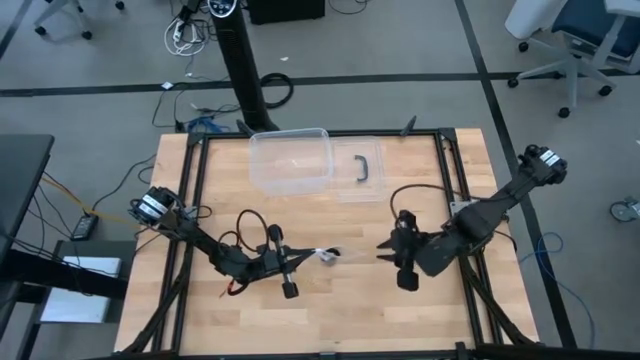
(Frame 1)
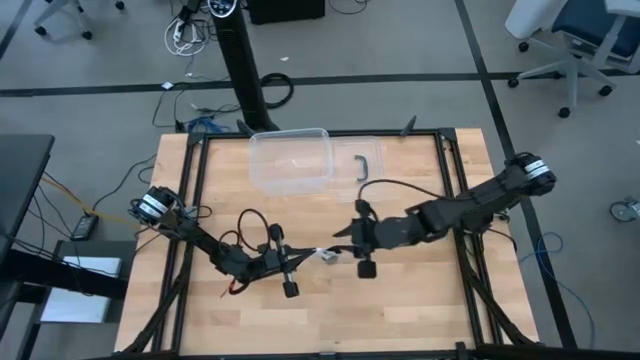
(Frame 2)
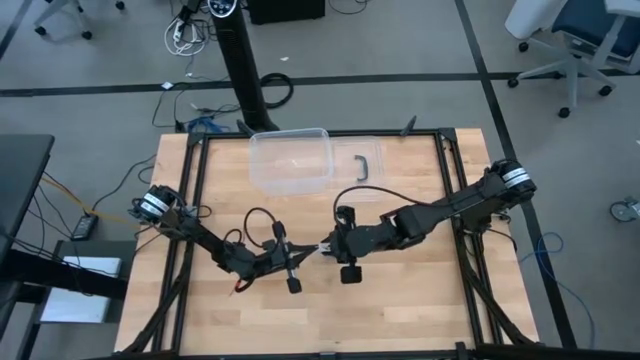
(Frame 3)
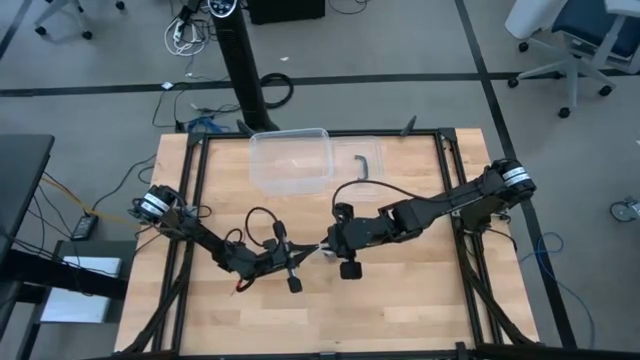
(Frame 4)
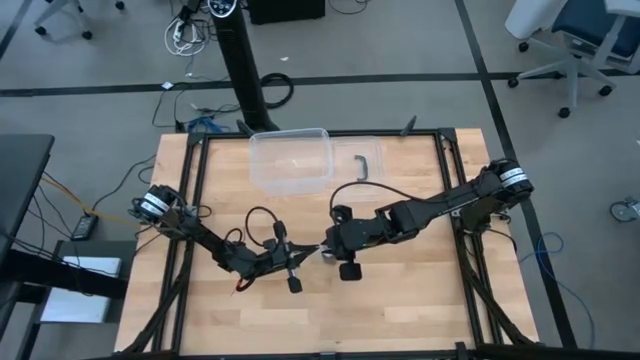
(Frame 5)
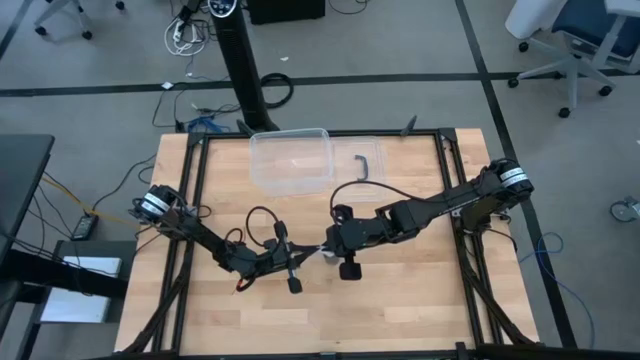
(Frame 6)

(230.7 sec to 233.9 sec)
Task: Roll bandage
Close the transparent zip bag

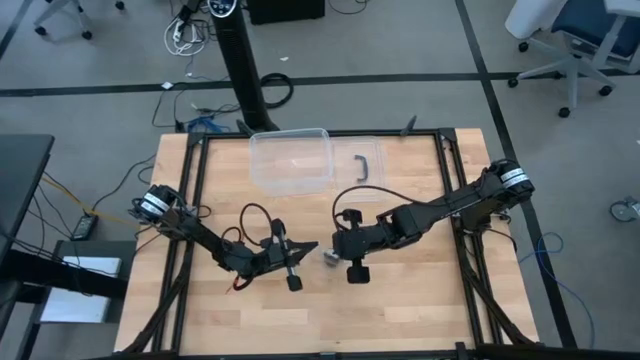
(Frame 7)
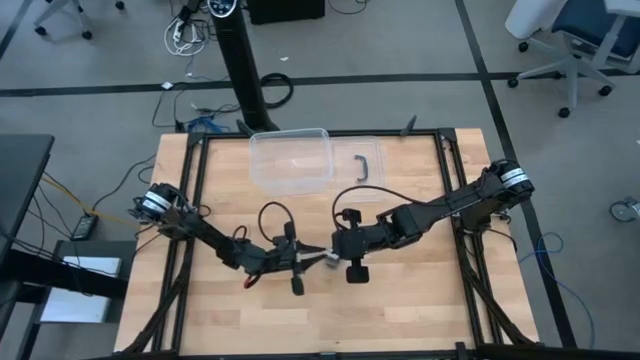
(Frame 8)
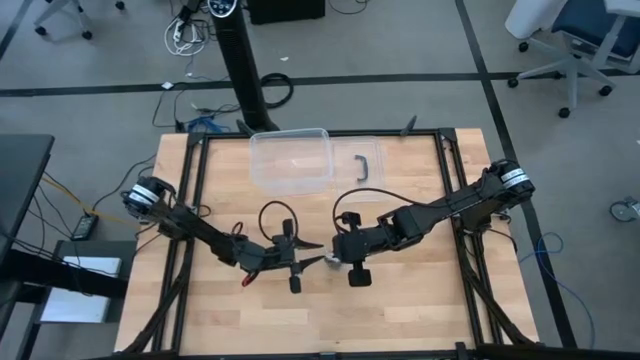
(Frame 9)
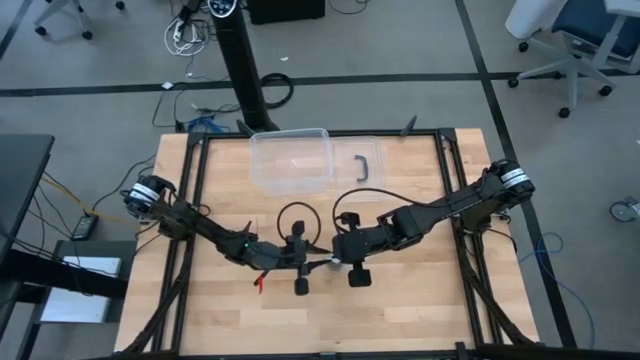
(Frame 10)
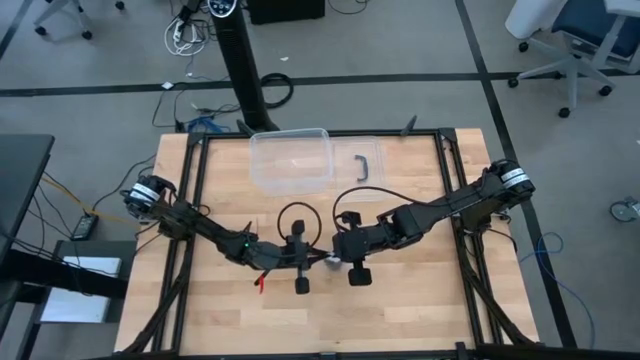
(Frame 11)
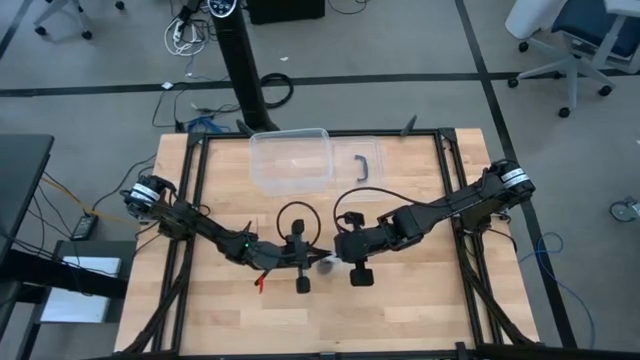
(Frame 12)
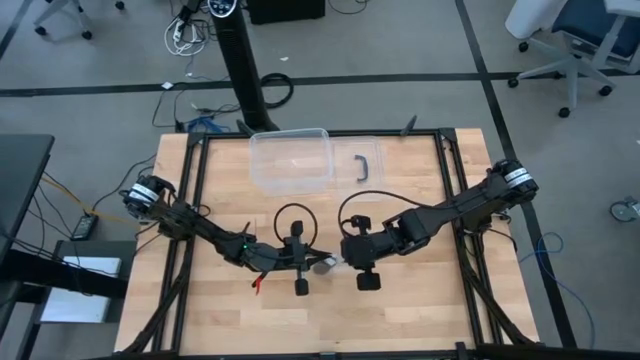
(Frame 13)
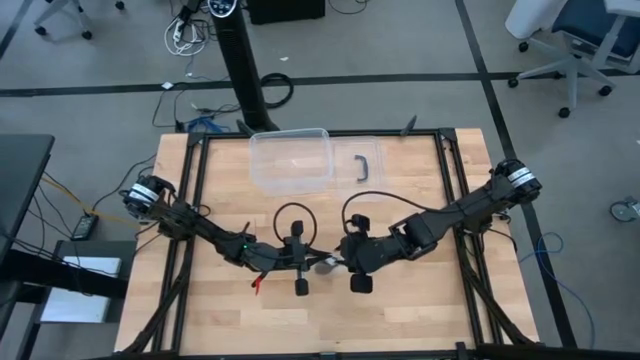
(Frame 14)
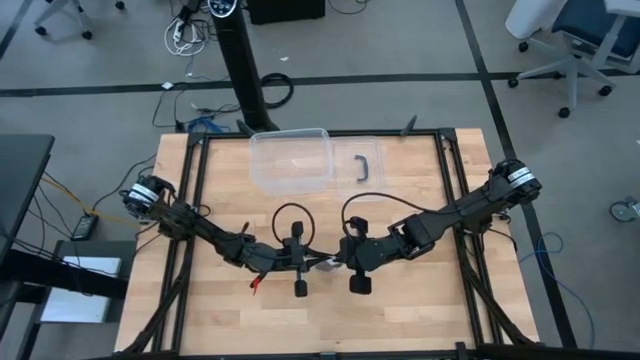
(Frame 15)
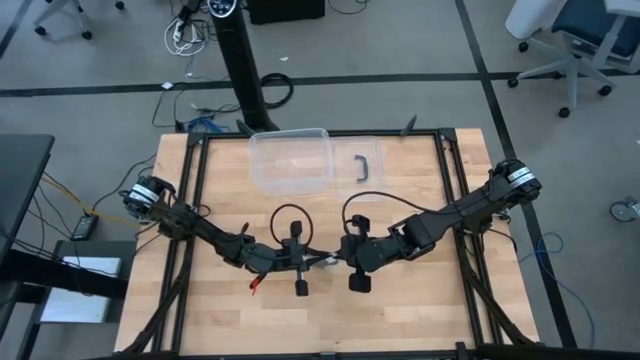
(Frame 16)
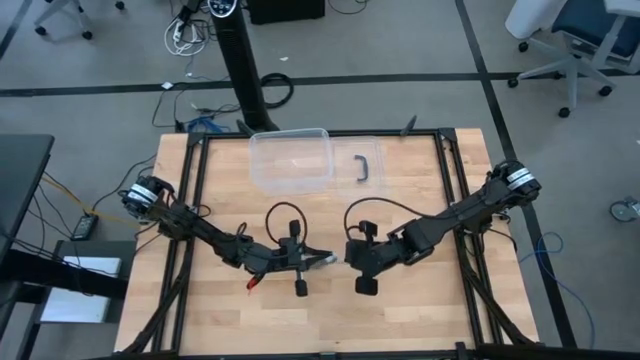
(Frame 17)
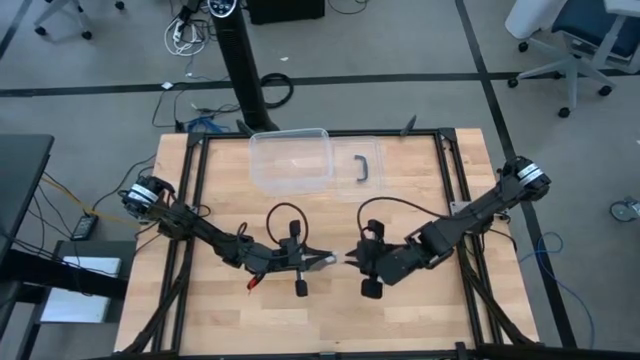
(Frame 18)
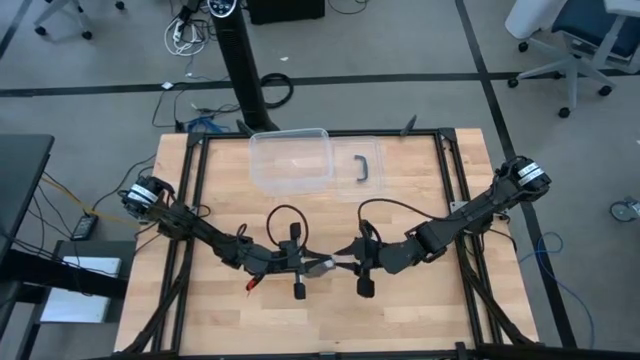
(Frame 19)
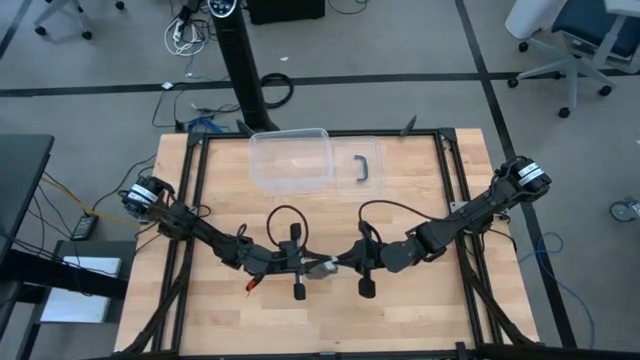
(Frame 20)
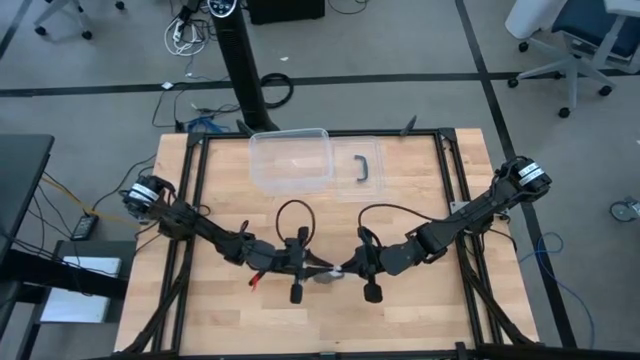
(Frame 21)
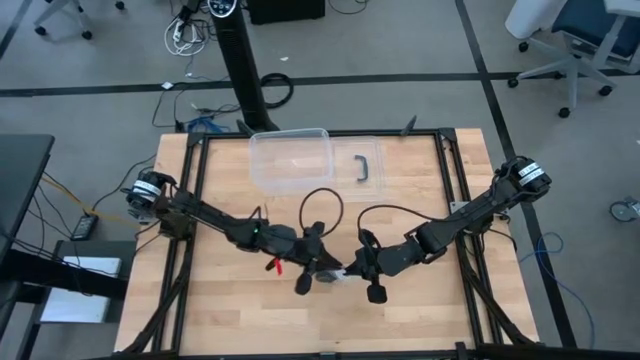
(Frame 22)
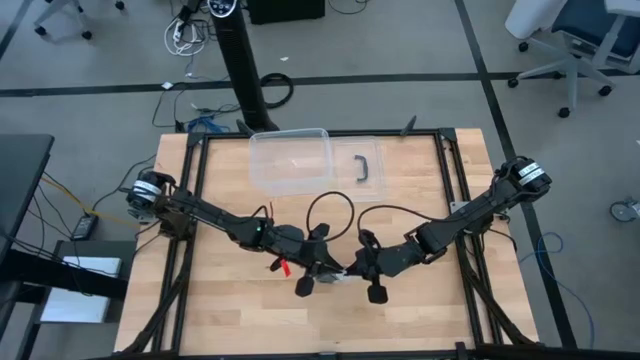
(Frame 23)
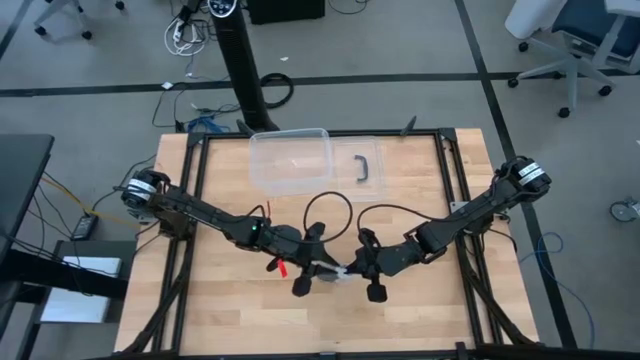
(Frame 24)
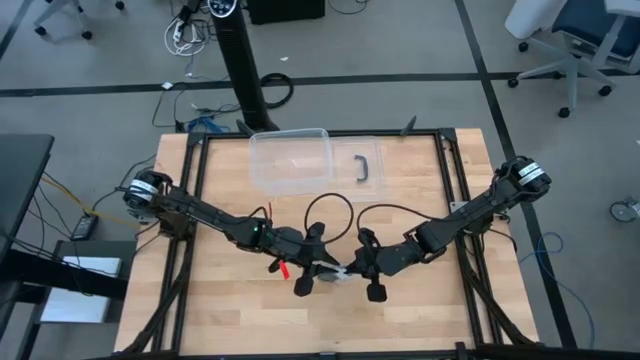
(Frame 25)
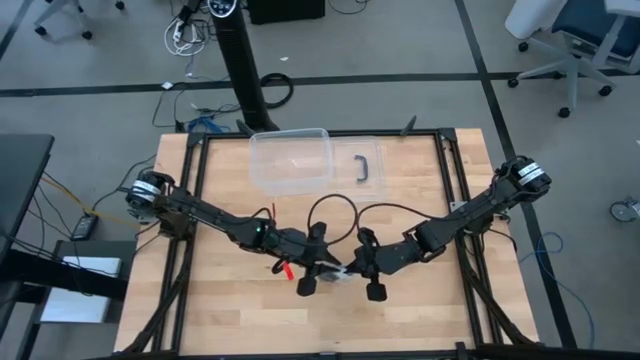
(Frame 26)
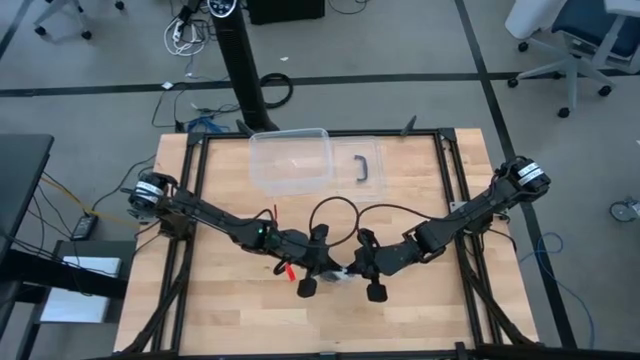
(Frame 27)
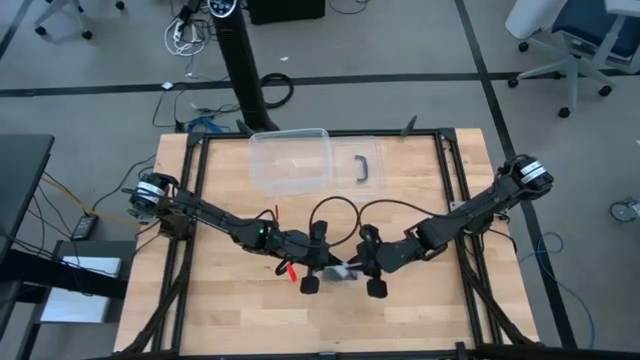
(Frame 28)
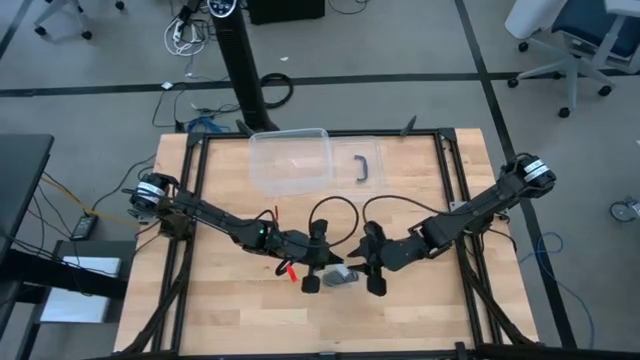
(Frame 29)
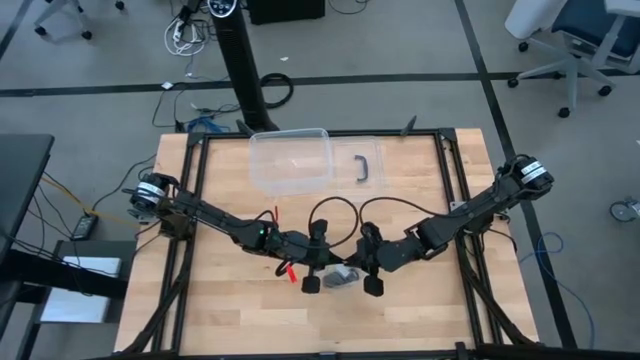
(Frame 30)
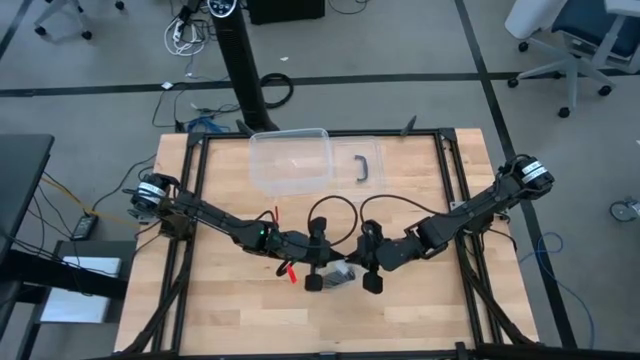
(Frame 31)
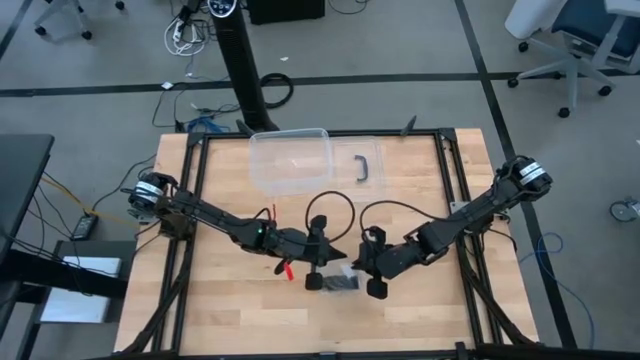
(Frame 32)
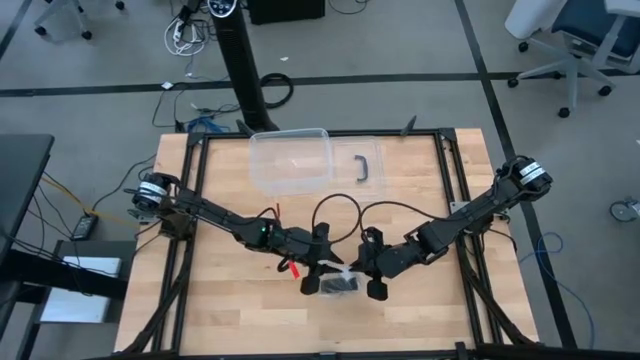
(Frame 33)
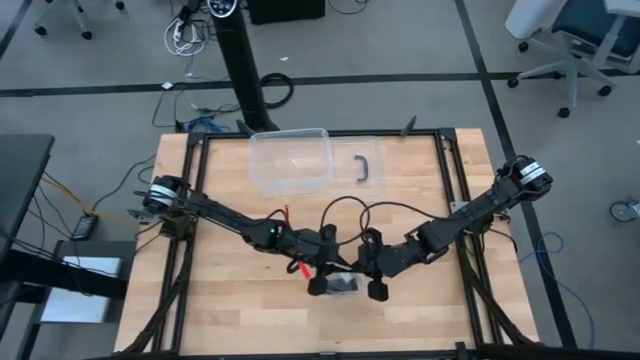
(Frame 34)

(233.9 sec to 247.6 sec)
Close the transparent zip bag

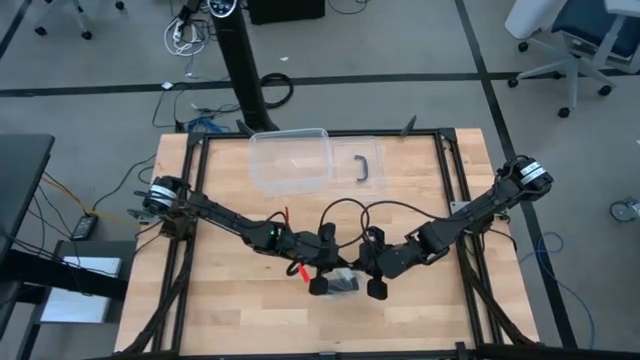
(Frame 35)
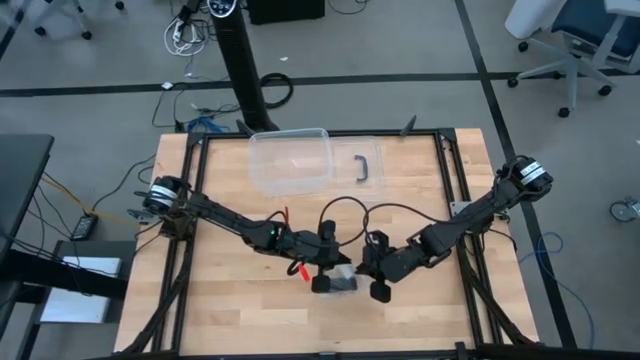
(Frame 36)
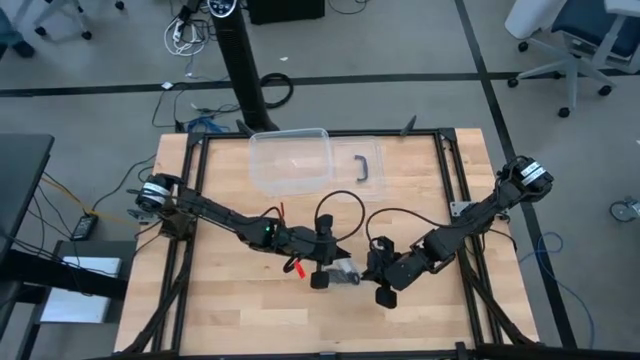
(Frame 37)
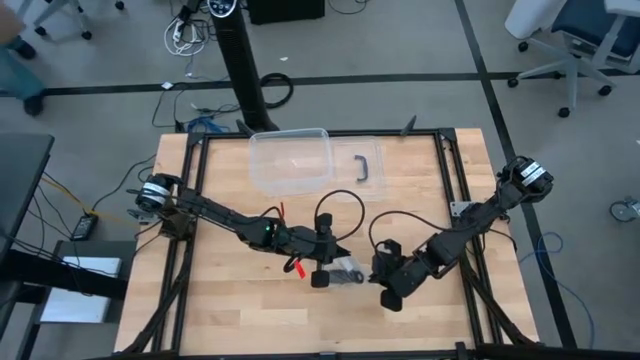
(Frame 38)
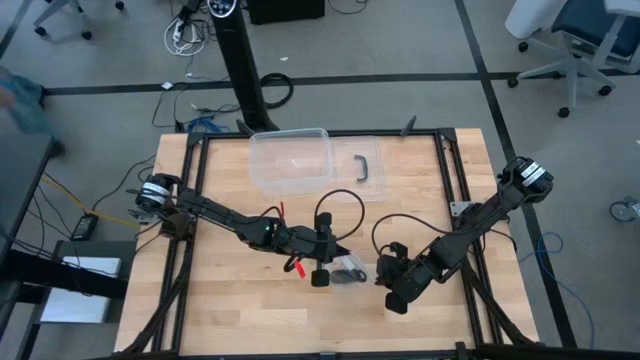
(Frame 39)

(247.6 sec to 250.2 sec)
Close the transparent zip bag
